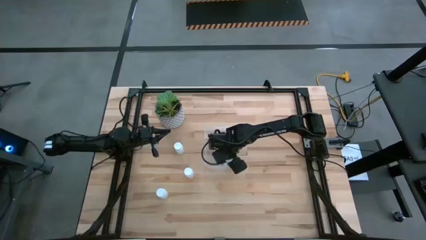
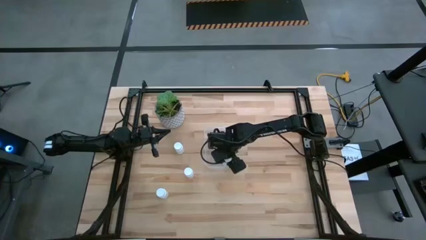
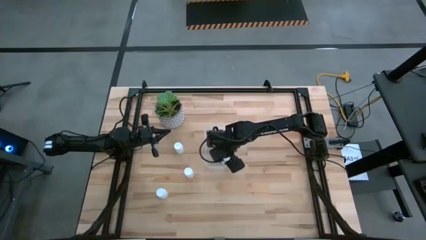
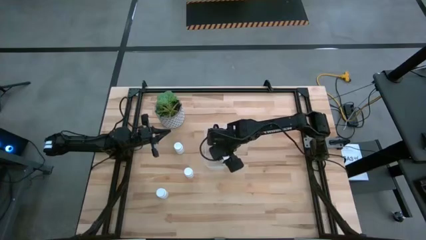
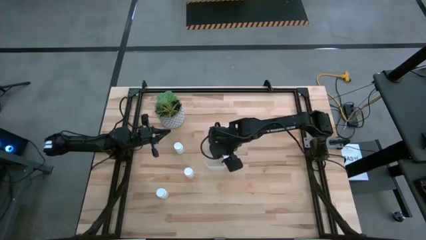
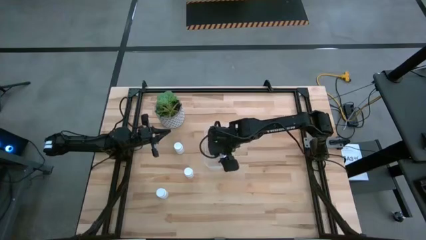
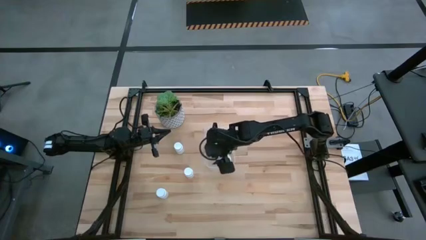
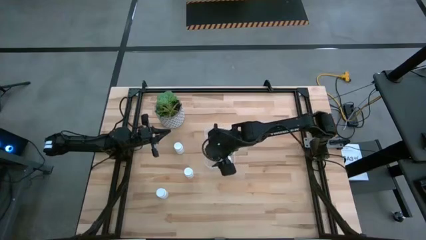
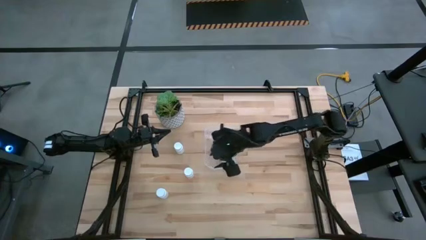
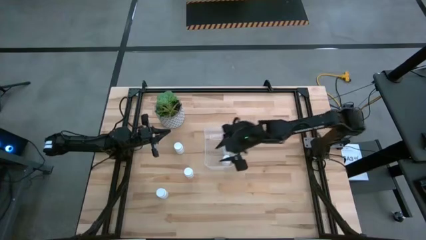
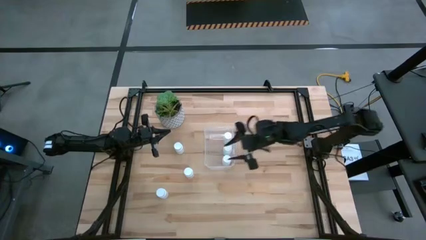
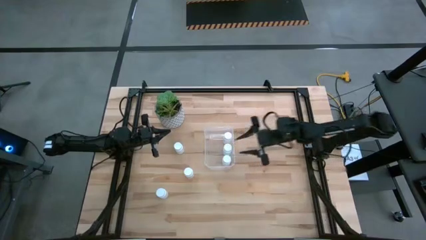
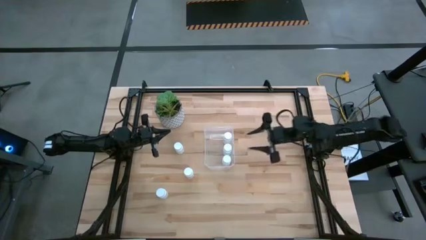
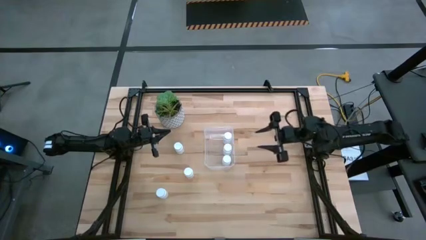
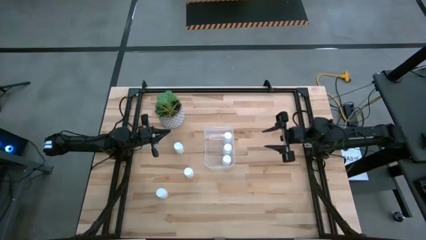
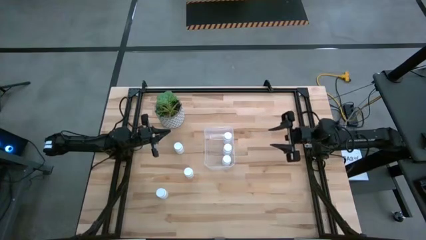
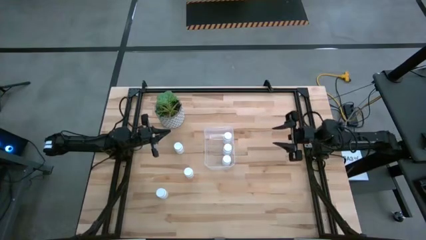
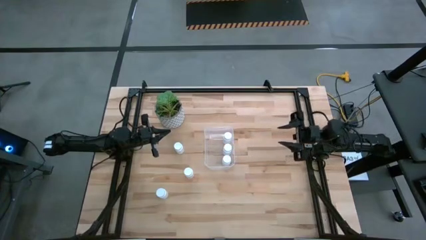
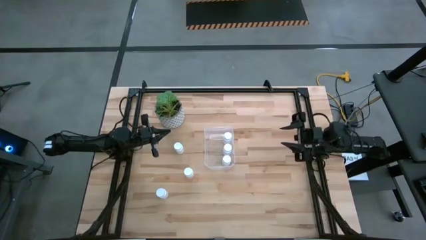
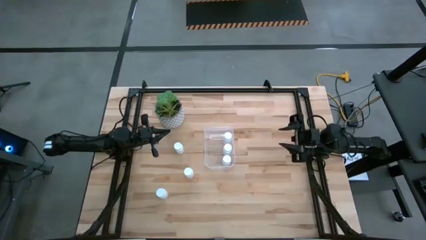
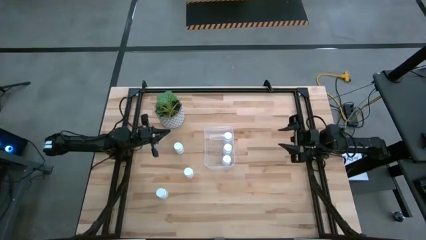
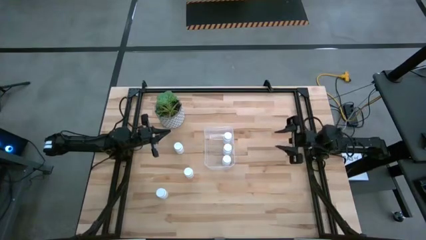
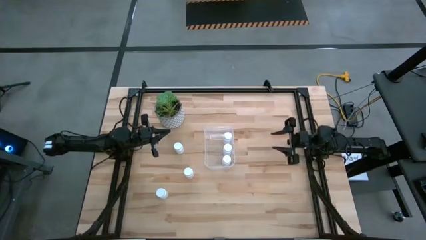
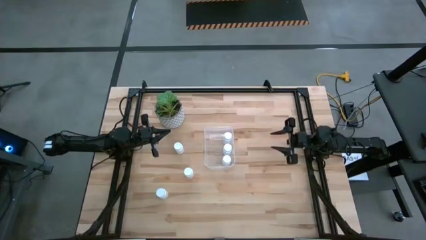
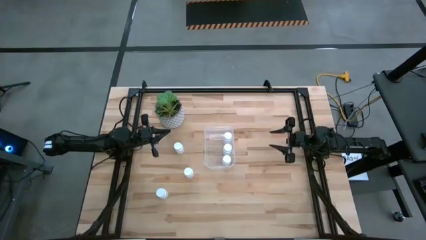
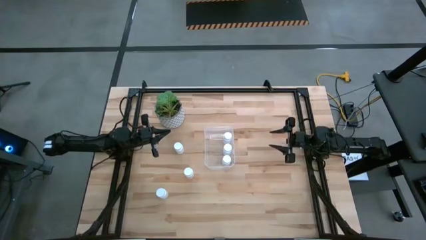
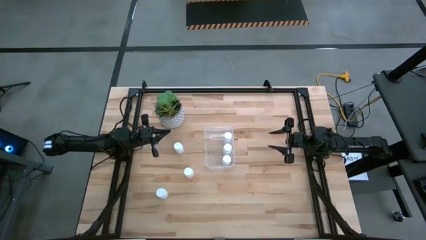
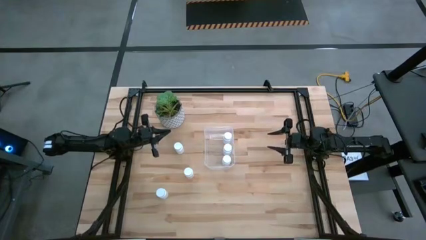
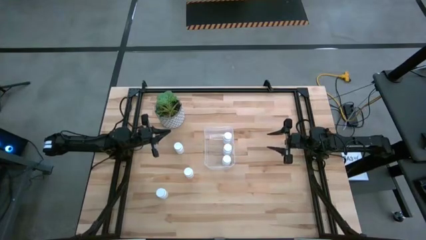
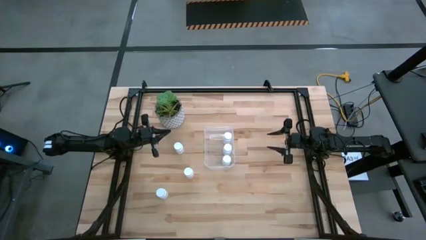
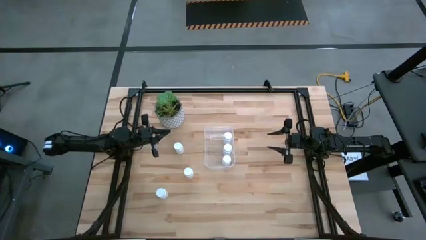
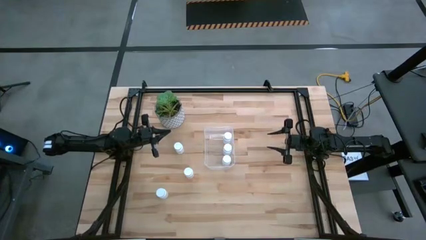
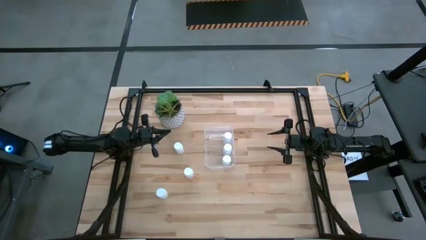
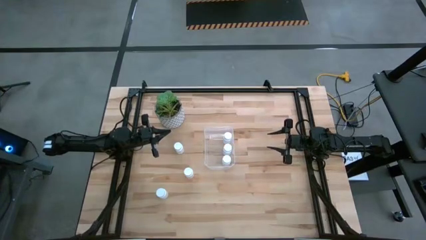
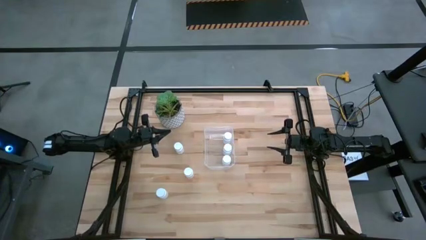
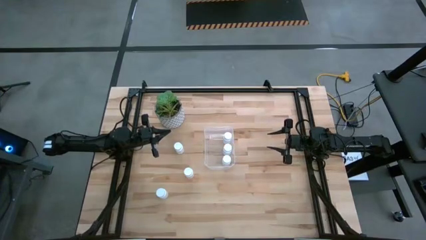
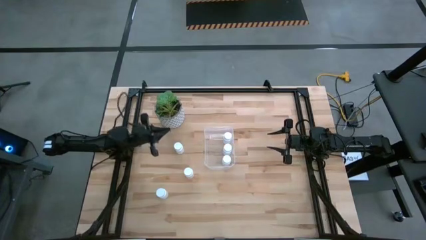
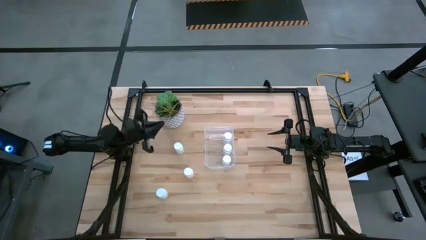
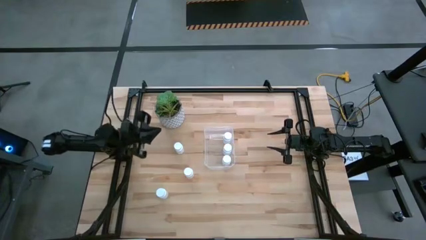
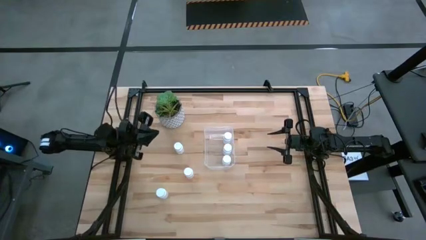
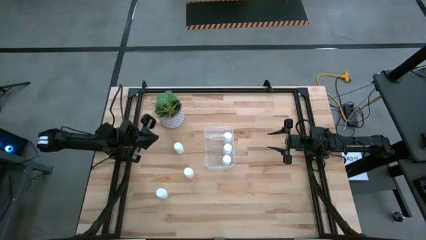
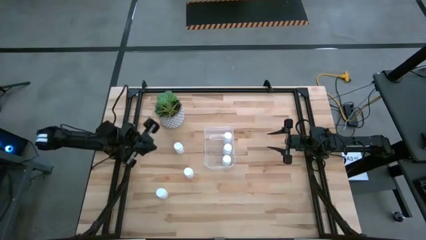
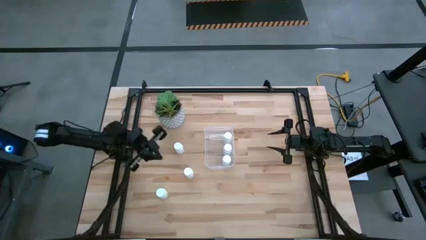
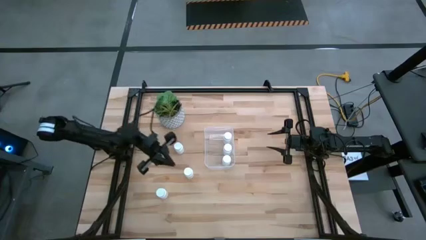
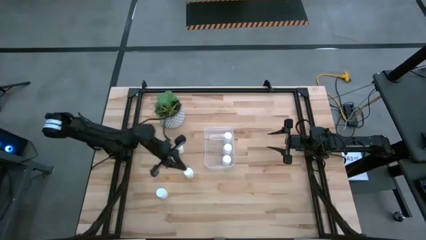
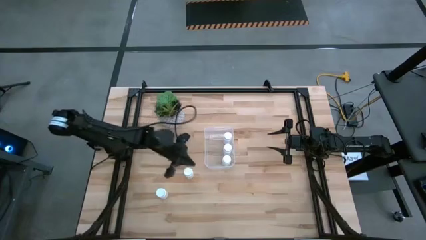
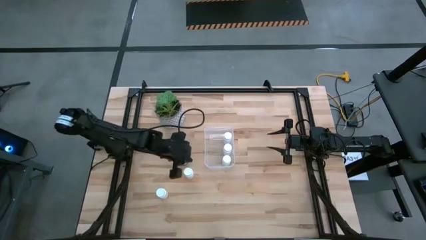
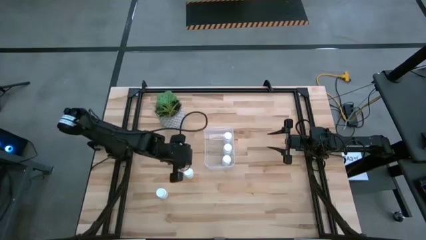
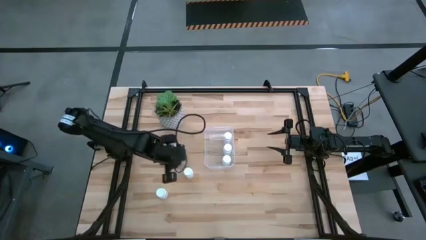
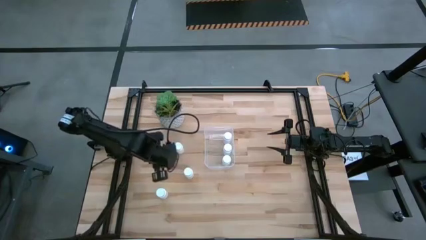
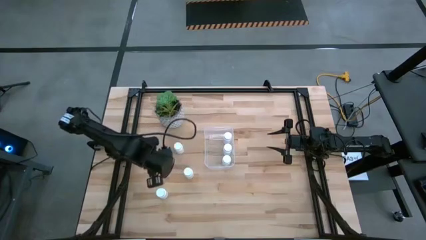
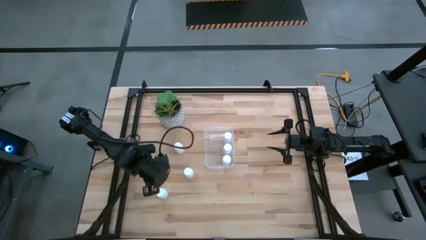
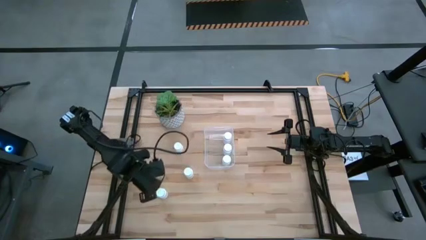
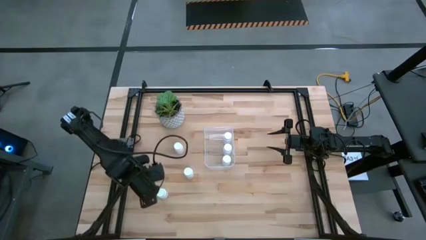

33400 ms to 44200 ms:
Task: Pick and place pill bottles into a basket
Put the white pill bottle into the transparent container

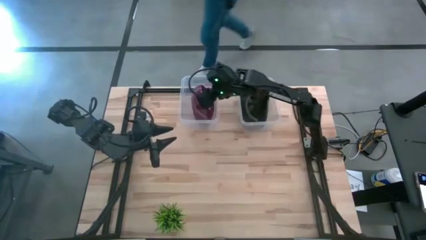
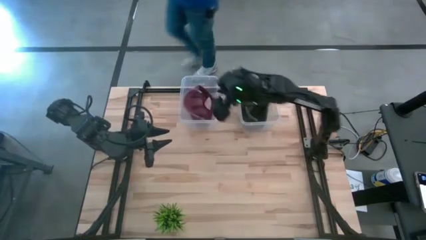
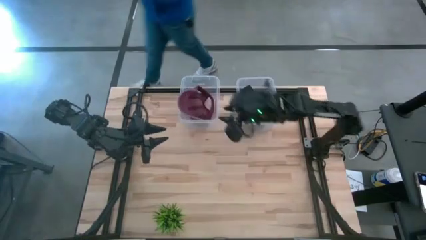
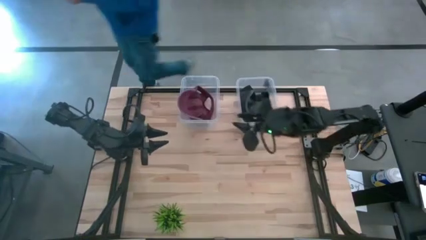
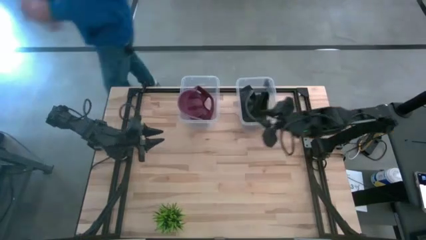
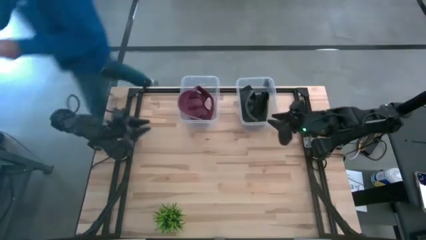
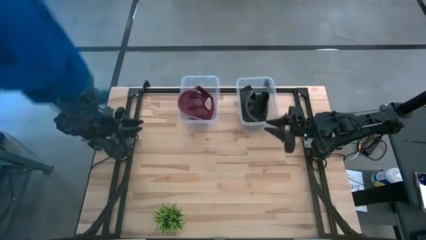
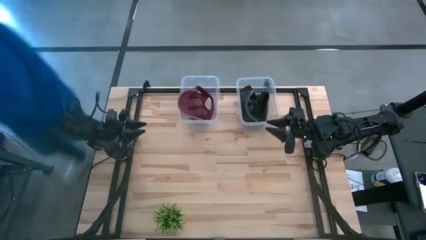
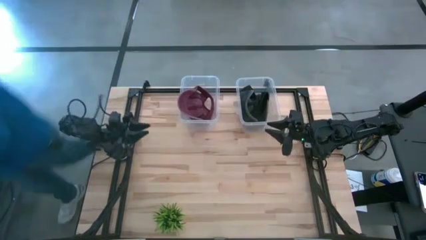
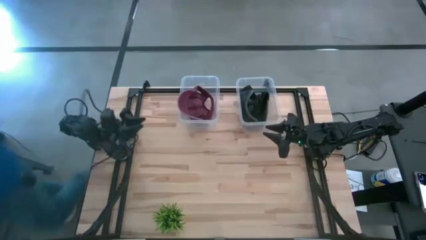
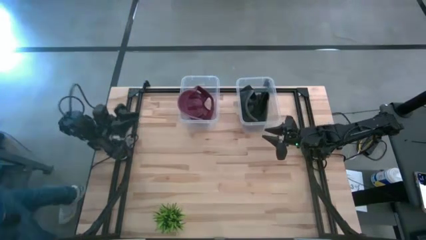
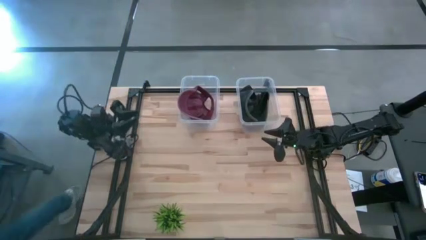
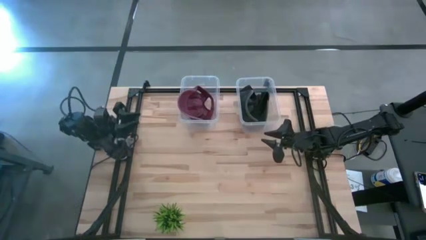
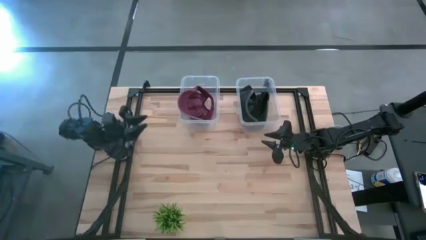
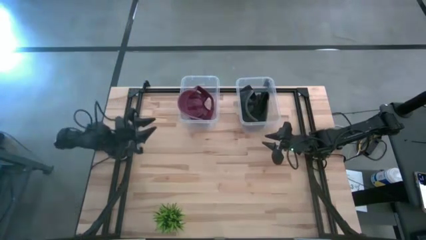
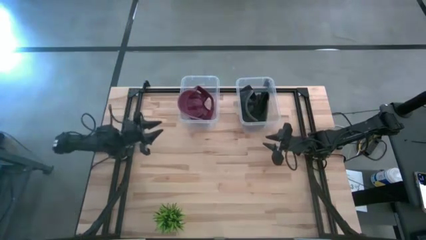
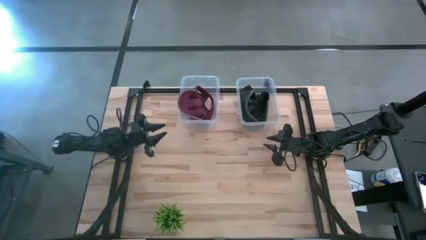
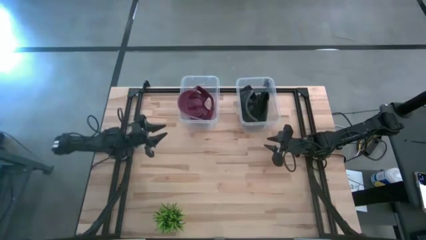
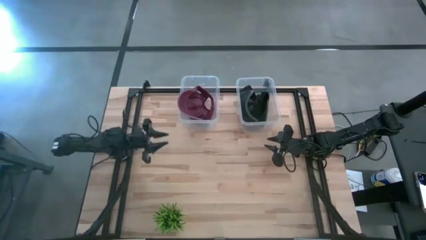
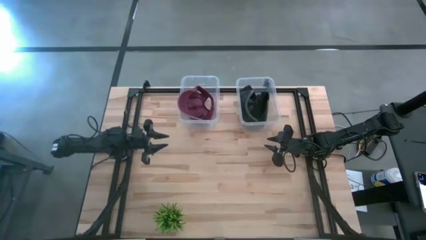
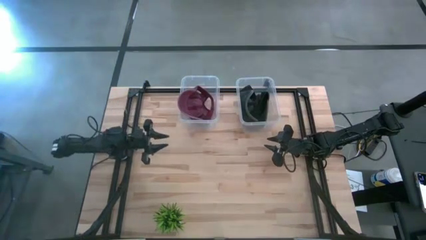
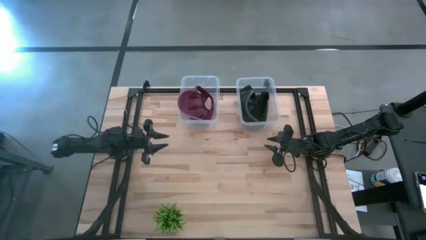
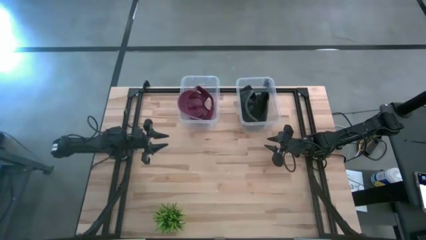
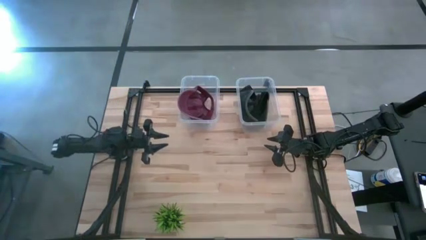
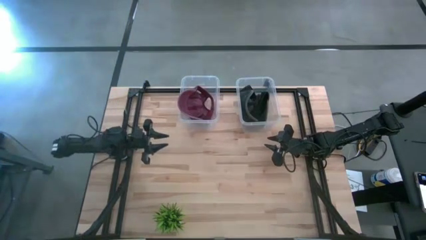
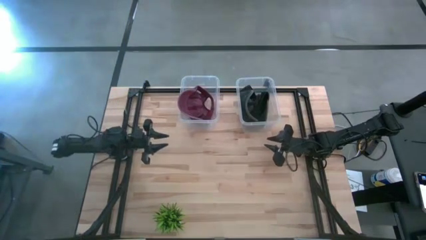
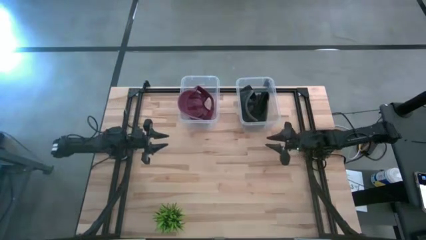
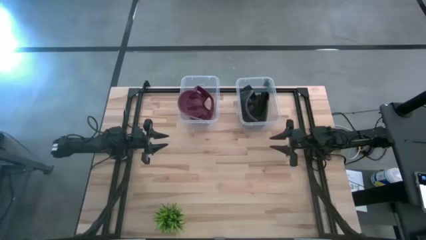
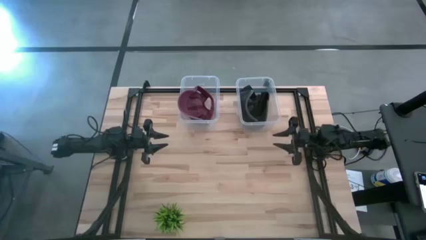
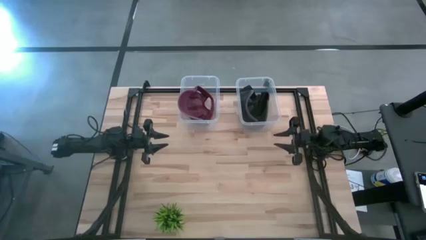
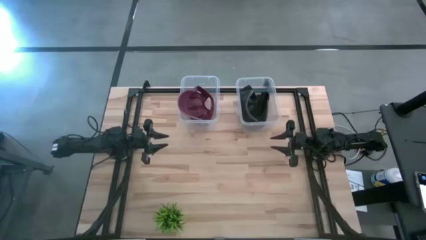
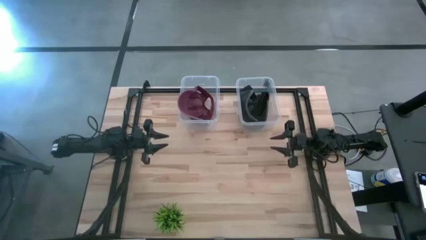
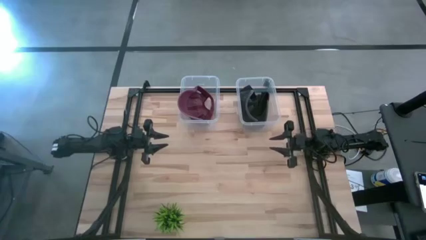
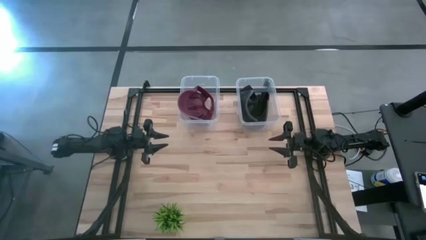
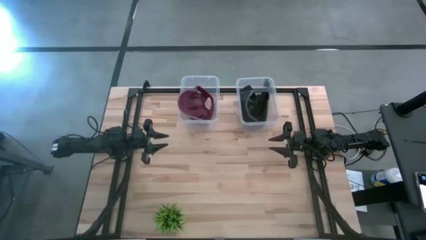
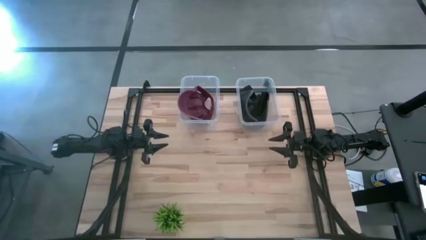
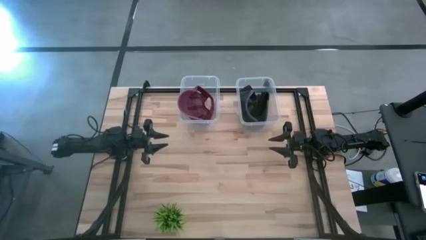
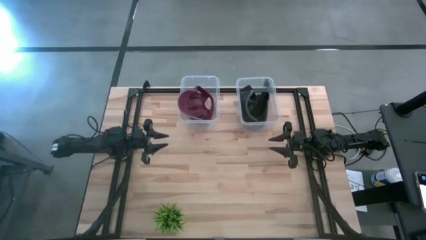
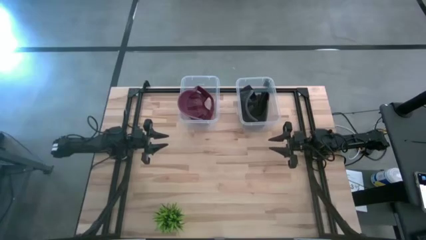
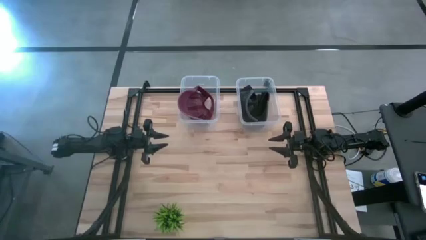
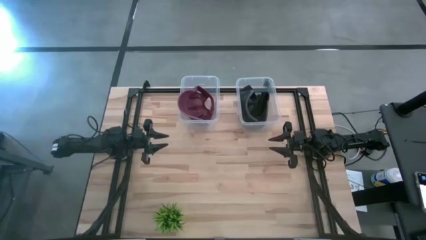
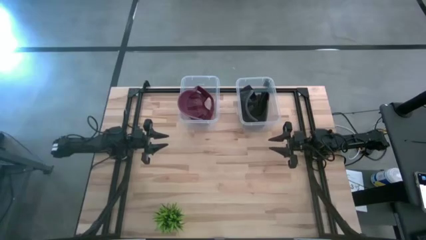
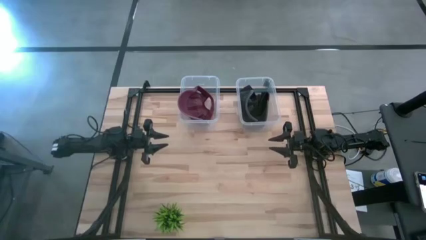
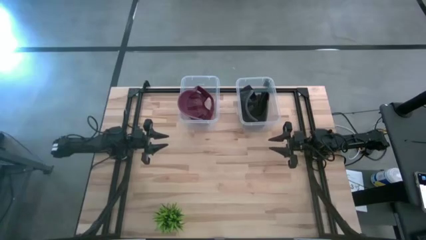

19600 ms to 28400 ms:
Task: Pick & Place hat
Return to Home Position
